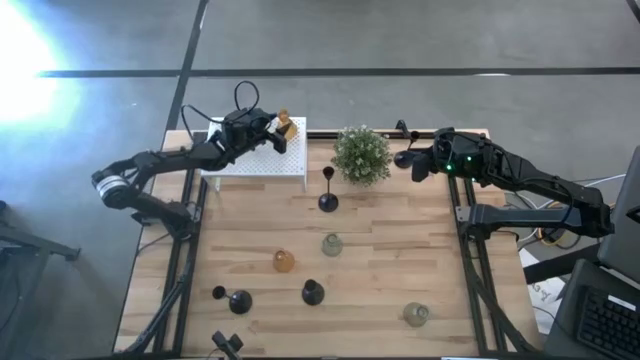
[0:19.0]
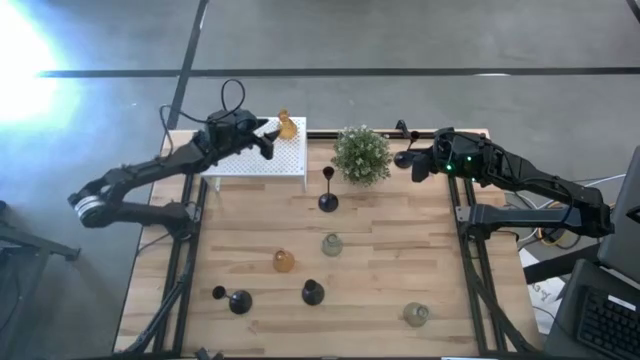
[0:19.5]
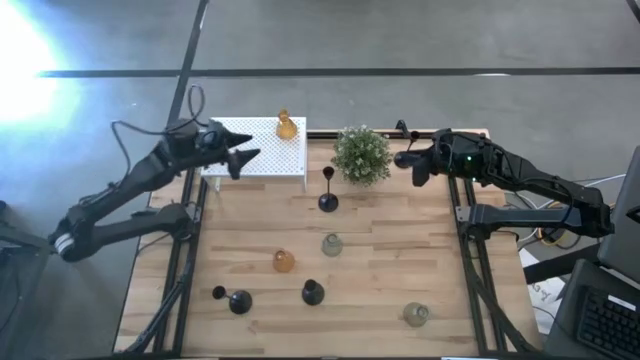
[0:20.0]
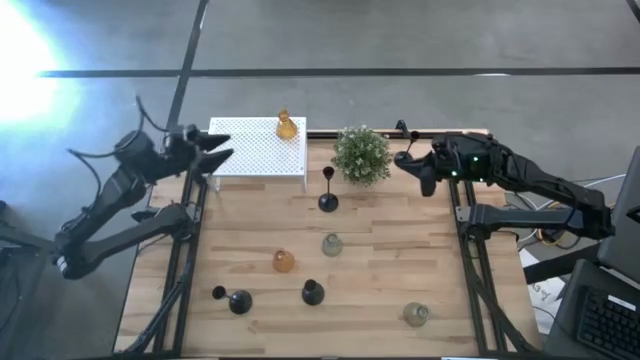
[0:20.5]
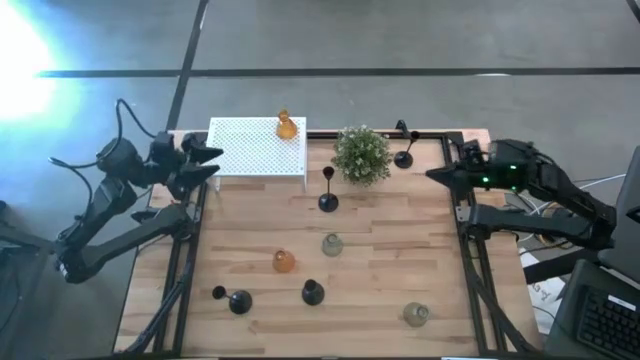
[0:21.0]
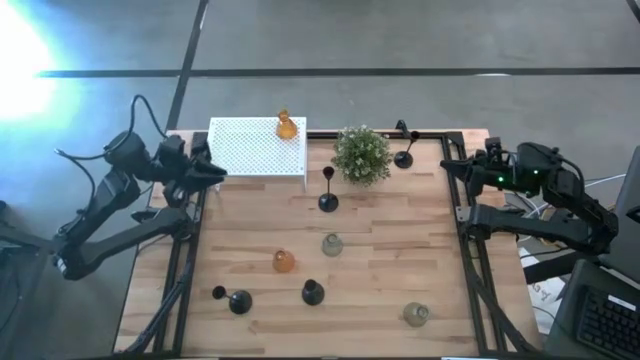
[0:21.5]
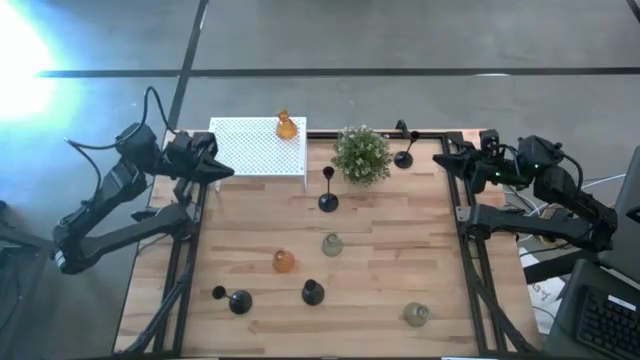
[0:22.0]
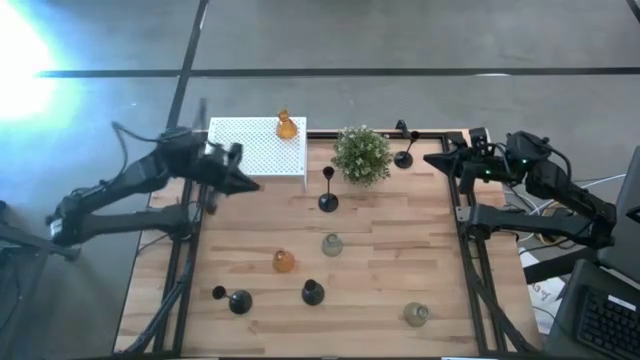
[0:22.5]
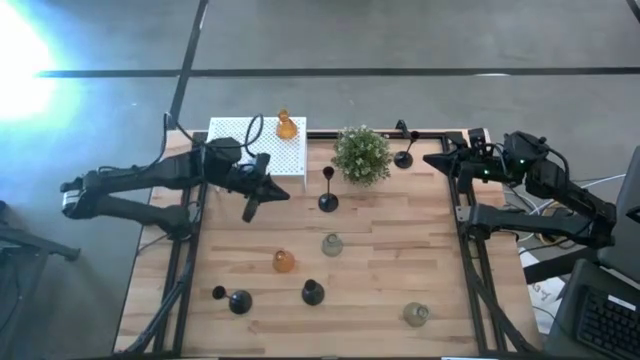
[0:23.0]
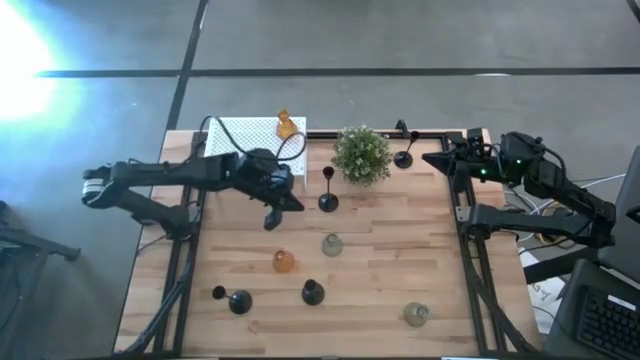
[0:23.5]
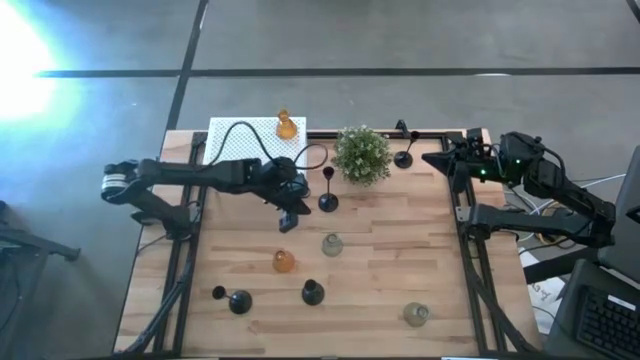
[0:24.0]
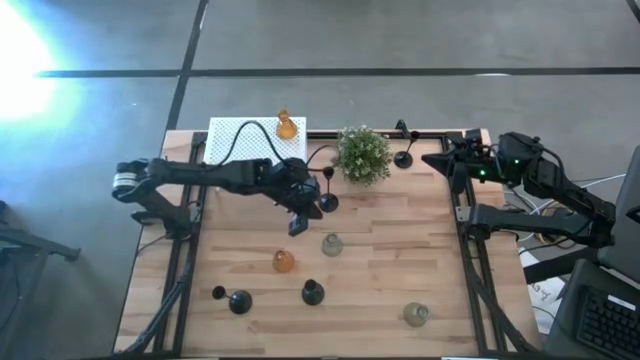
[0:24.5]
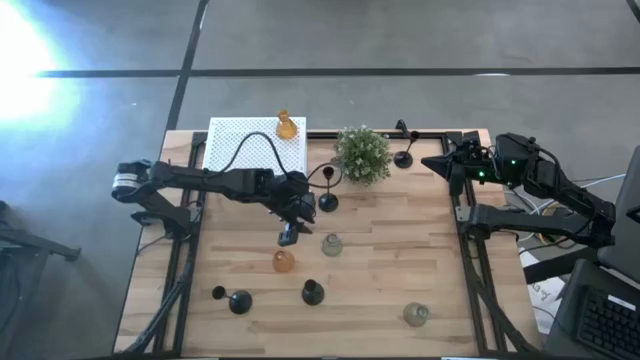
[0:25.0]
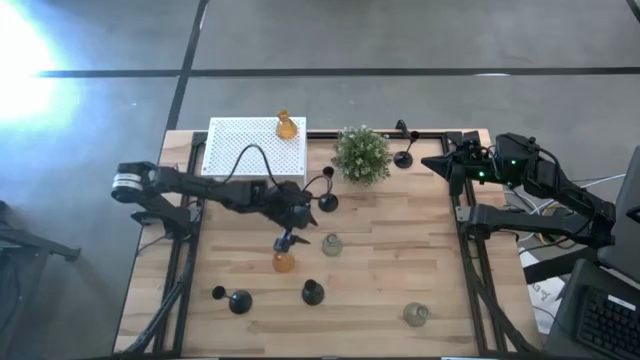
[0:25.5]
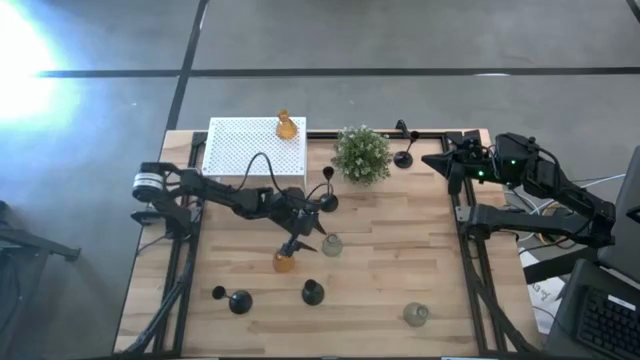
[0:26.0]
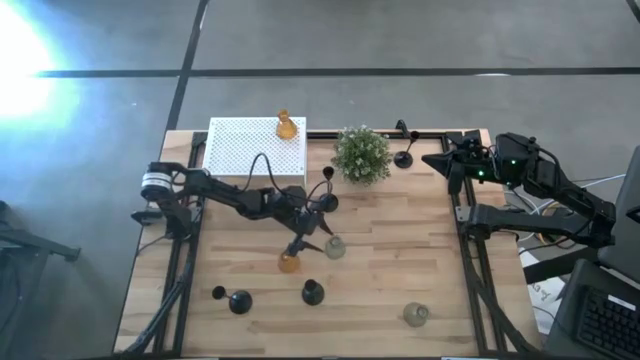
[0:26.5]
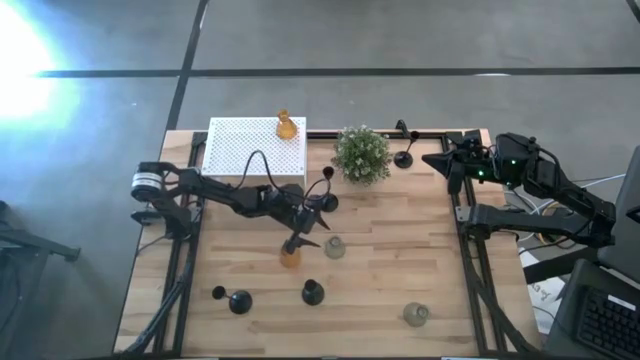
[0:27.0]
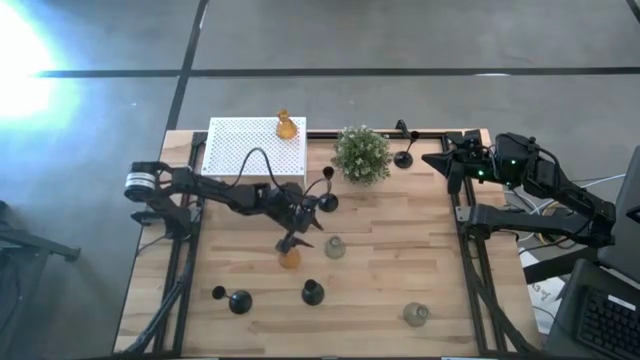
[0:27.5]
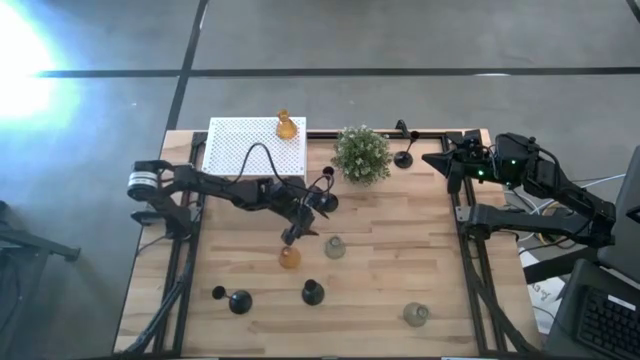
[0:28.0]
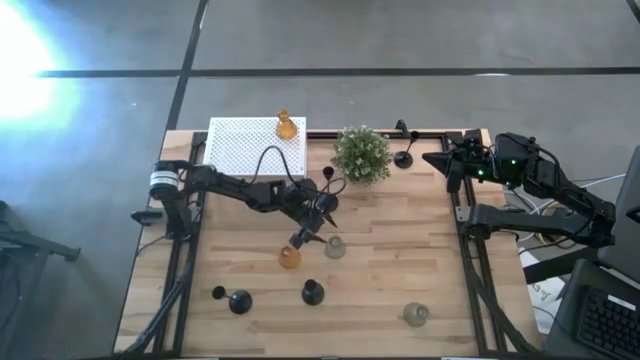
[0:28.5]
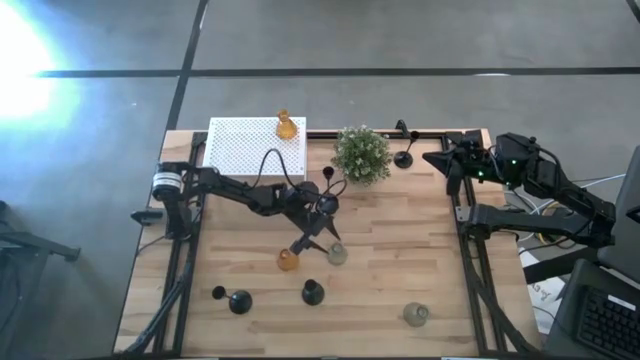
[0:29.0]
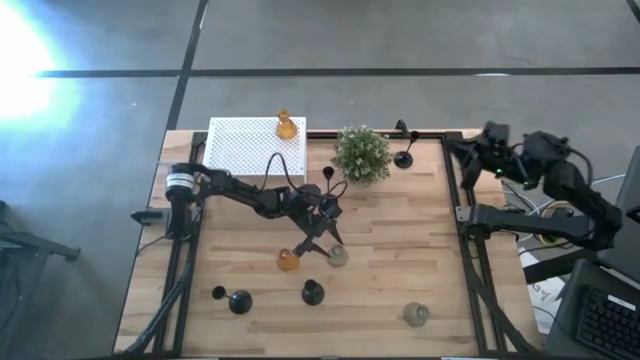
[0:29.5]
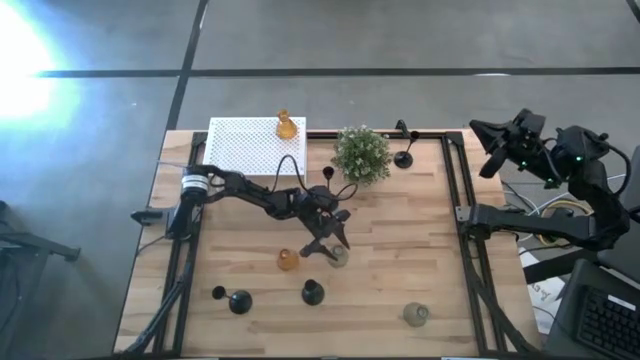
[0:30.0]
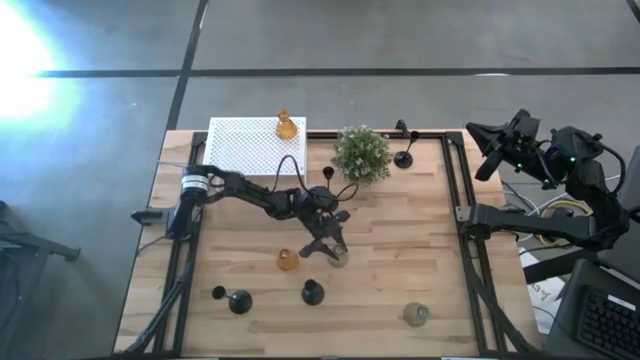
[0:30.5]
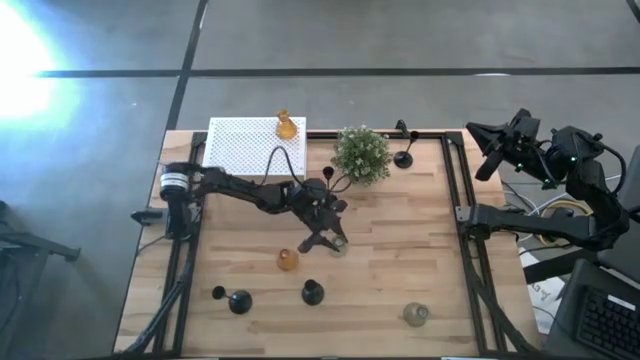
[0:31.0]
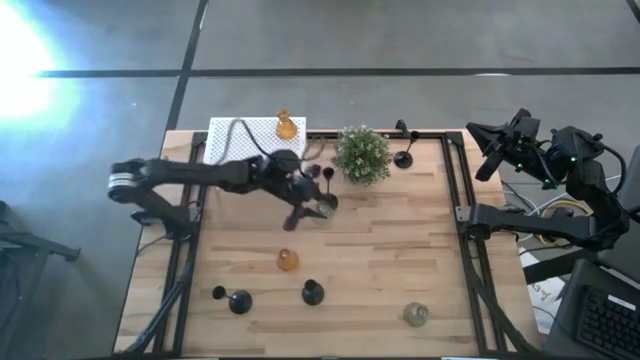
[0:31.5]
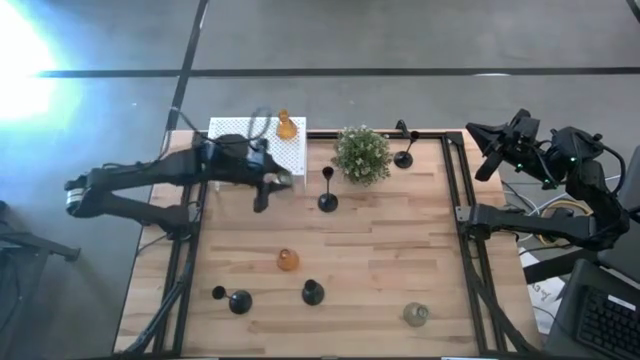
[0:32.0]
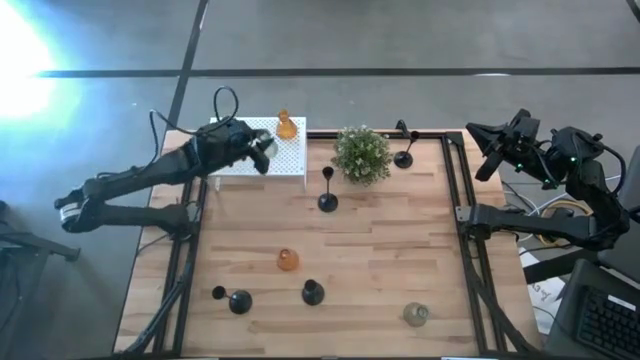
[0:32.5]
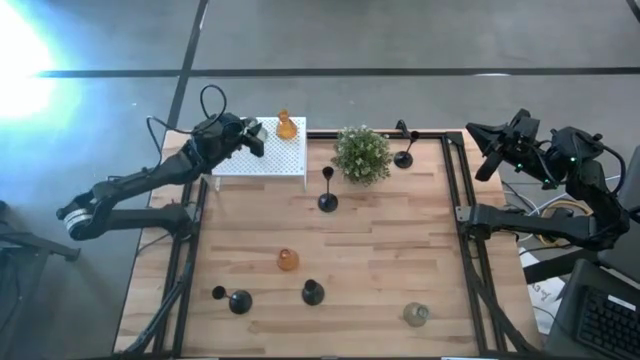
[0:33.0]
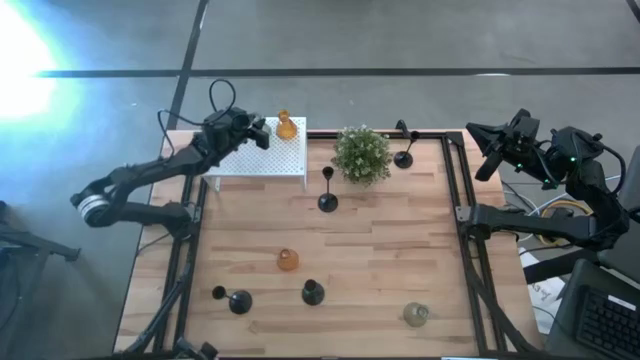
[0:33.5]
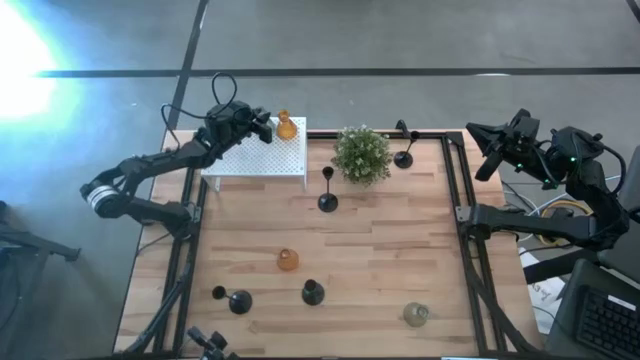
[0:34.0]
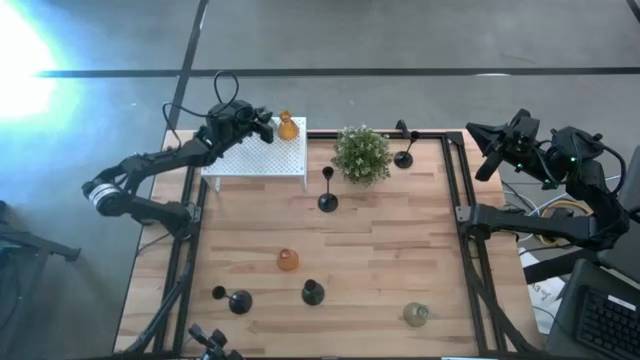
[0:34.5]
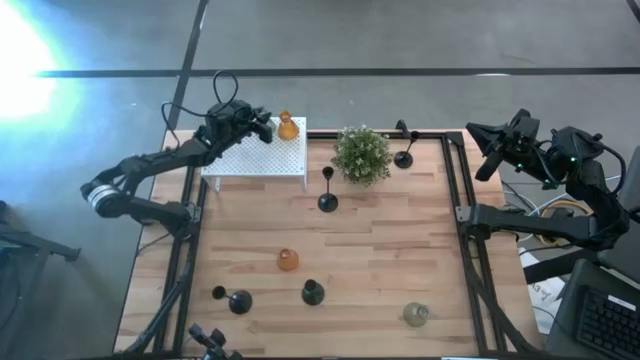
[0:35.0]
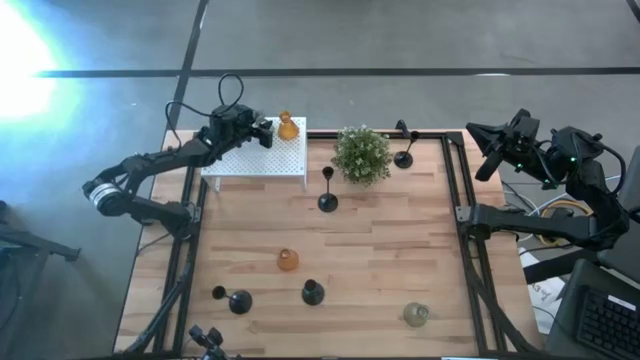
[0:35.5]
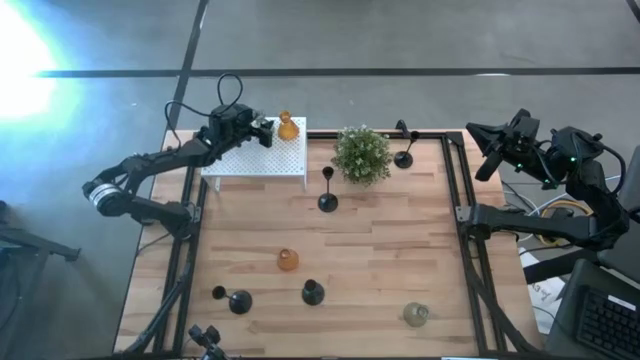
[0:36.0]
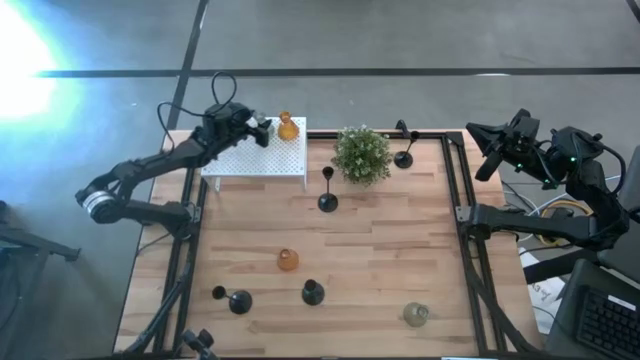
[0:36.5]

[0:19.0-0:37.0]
Task: Pick & Place candle stick holders
Put the top transparent glass candle holder on the shelf

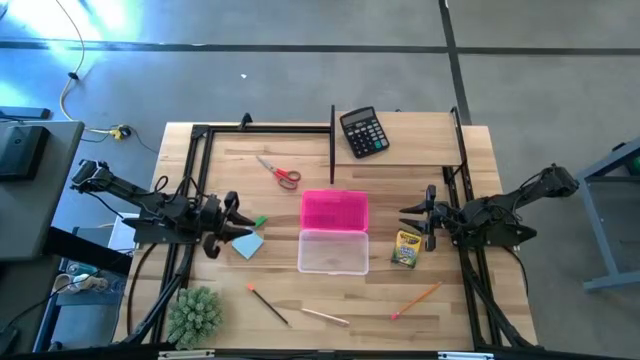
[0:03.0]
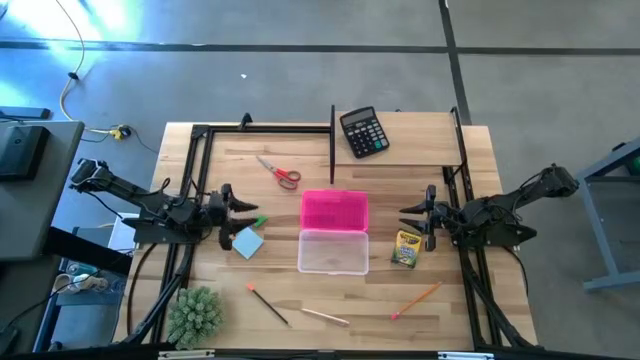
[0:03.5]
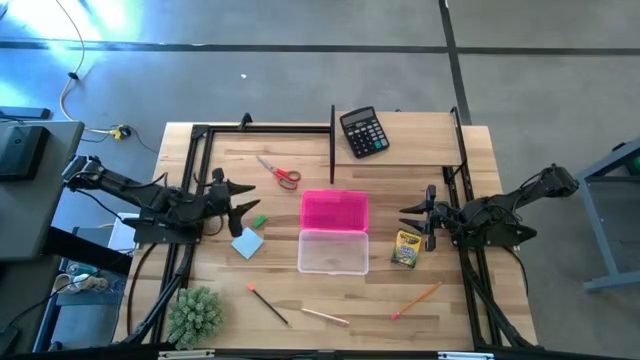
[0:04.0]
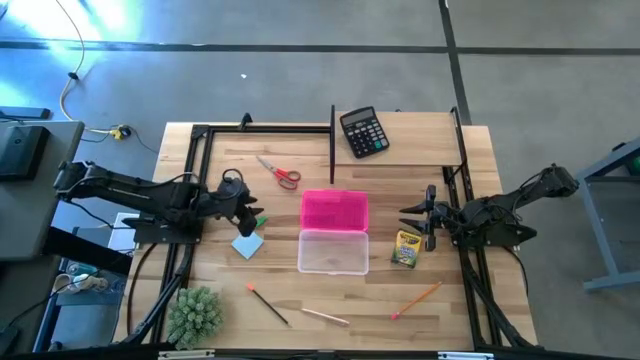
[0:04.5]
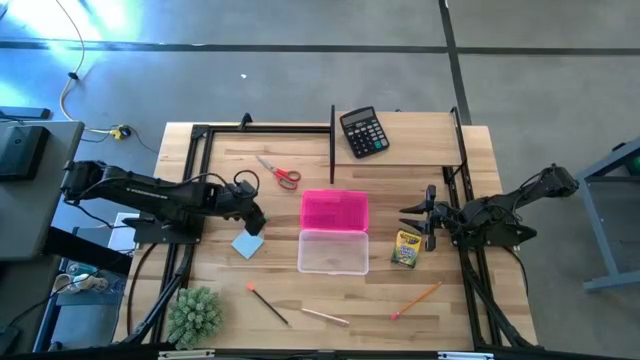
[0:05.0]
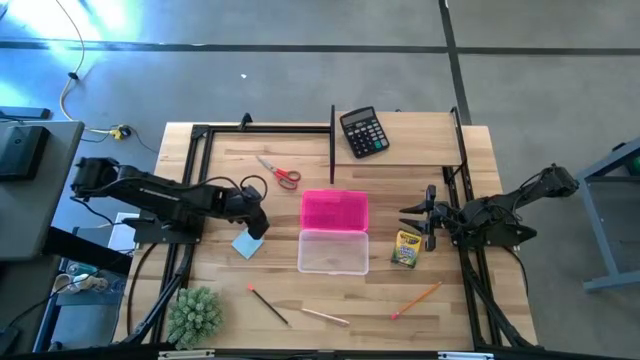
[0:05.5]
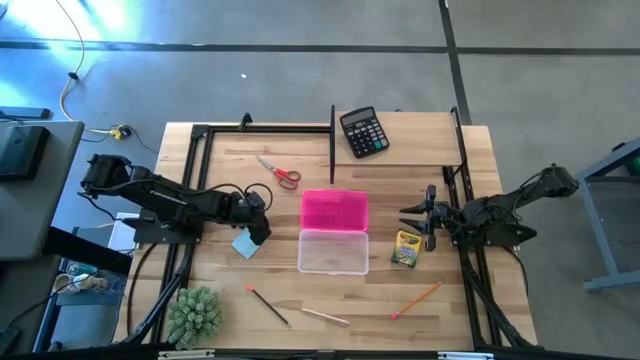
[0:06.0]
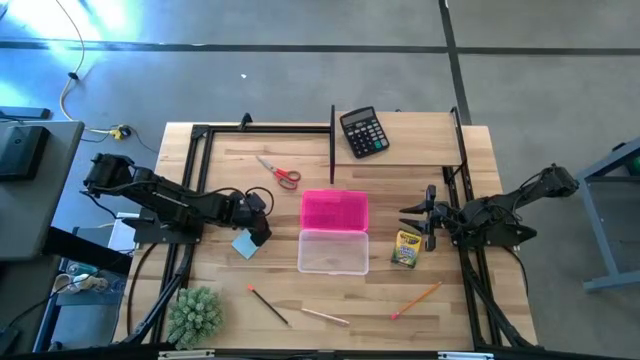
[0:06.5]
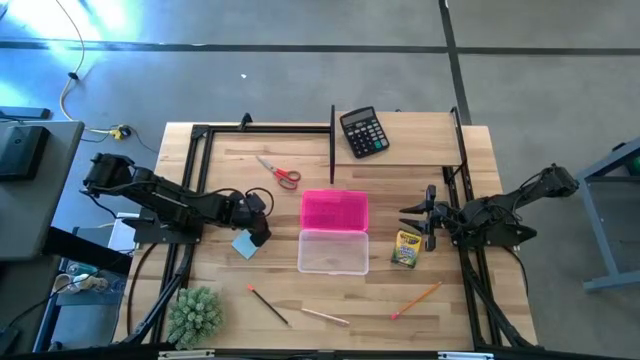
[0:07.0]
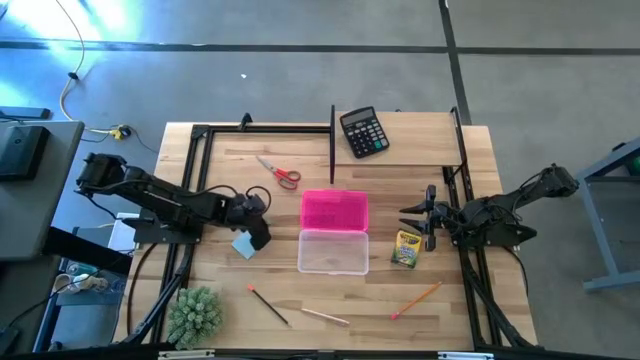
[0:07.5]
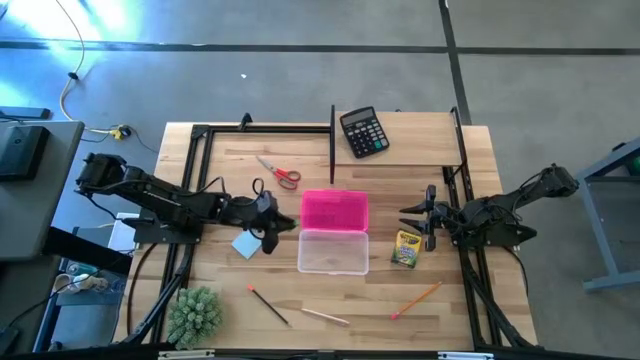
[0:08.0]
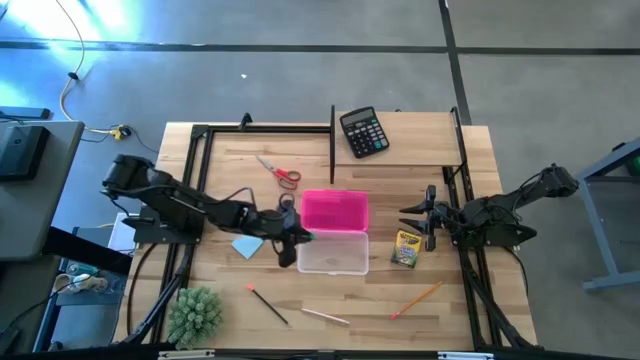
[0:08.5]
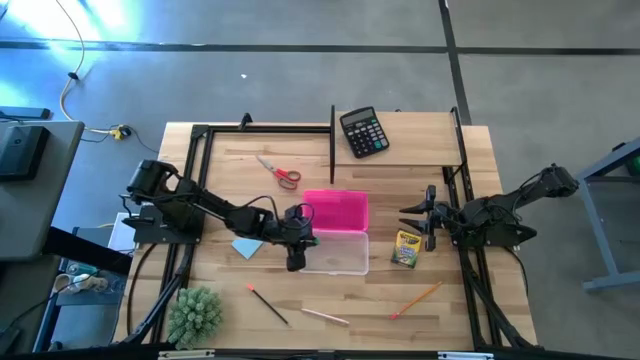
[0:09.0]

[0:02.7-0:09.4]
Task: Pack school essentials
Put the green eraser into the pink supply box
